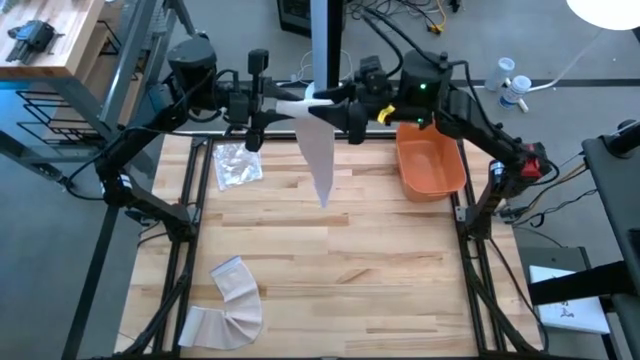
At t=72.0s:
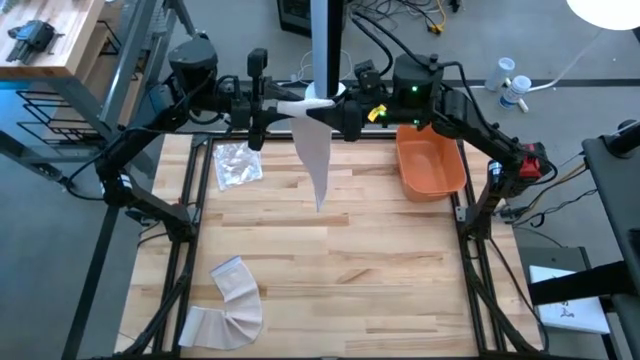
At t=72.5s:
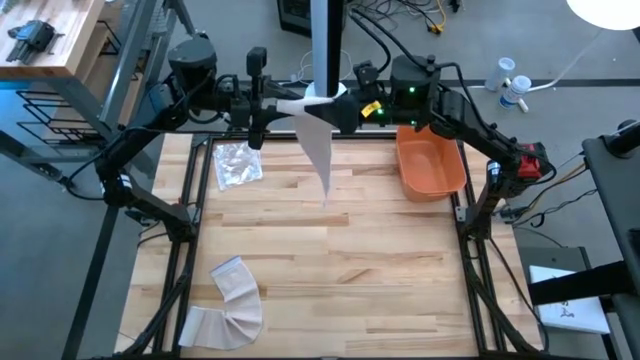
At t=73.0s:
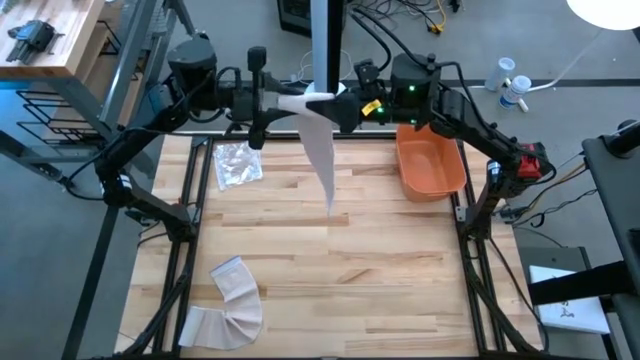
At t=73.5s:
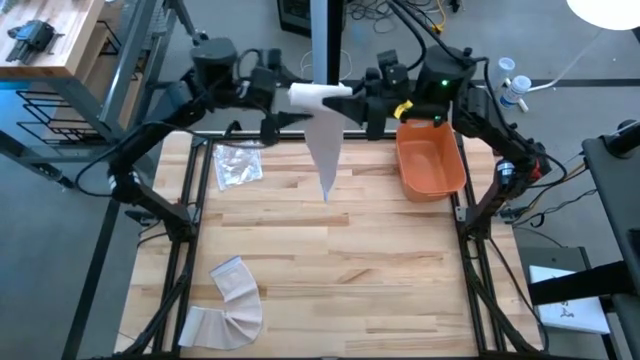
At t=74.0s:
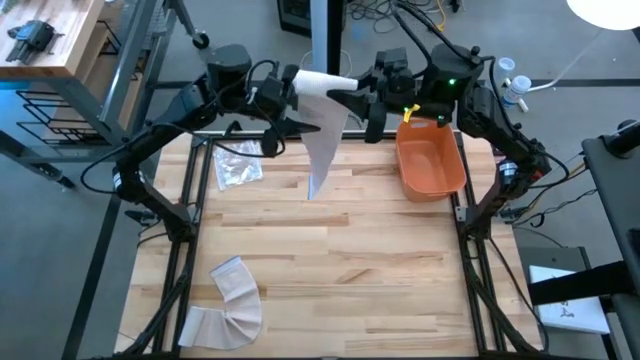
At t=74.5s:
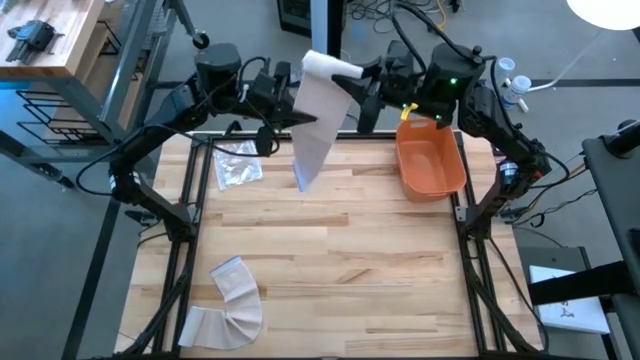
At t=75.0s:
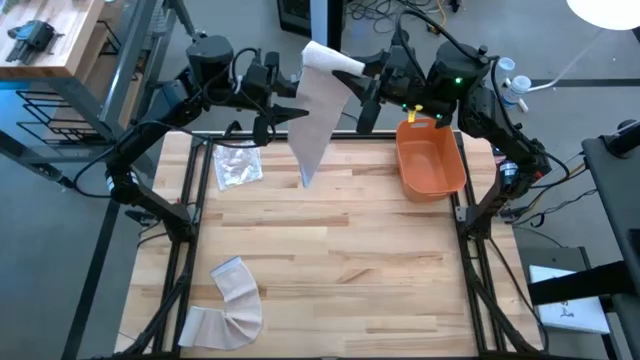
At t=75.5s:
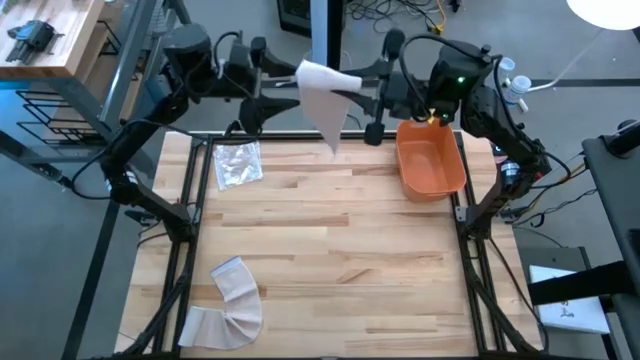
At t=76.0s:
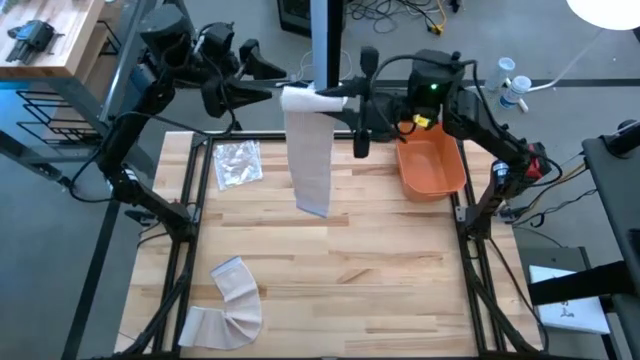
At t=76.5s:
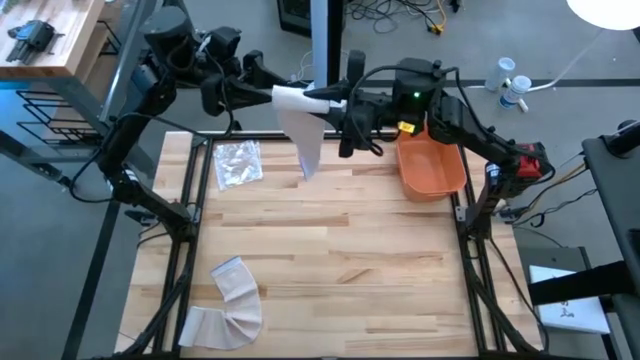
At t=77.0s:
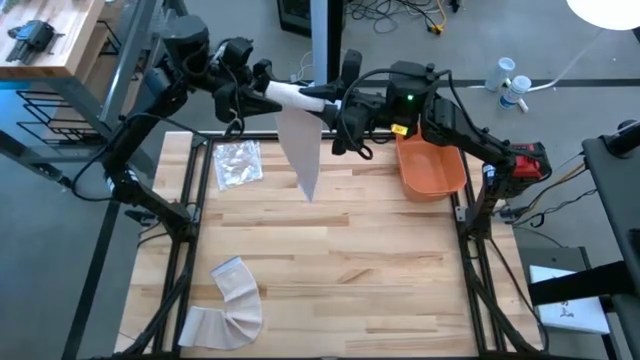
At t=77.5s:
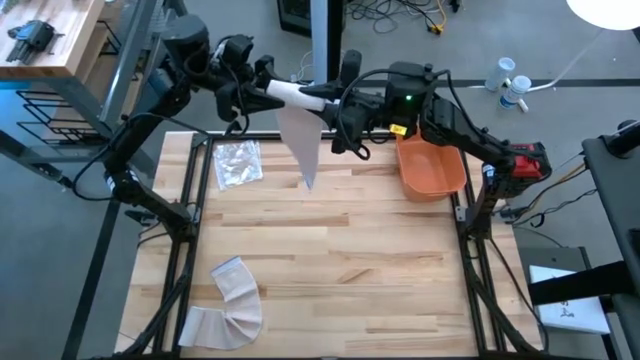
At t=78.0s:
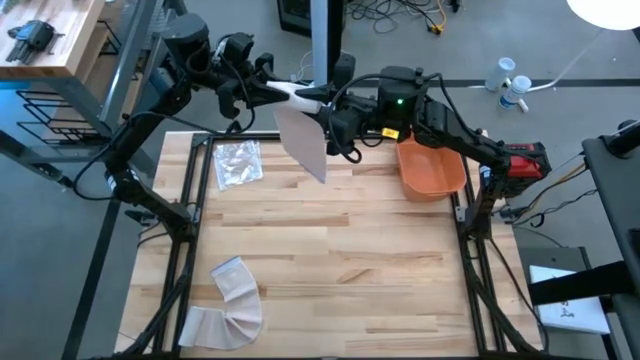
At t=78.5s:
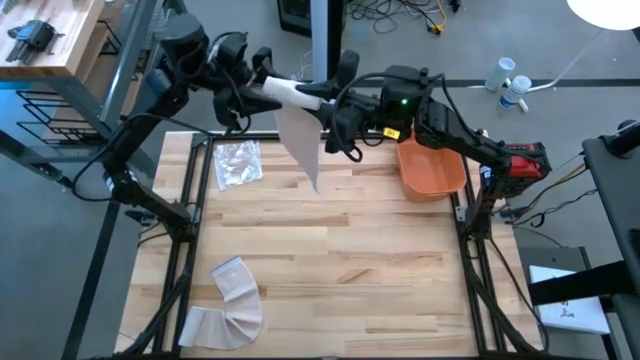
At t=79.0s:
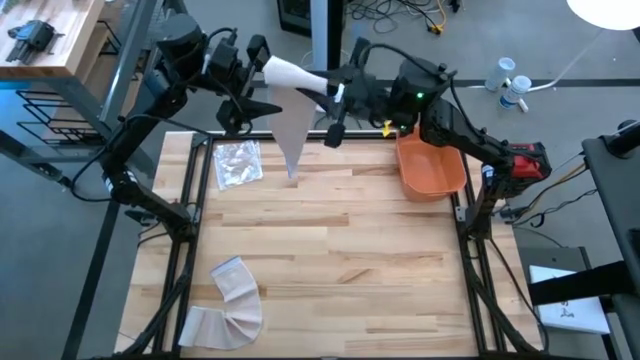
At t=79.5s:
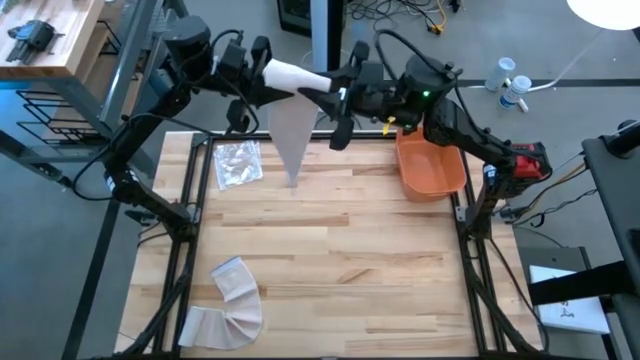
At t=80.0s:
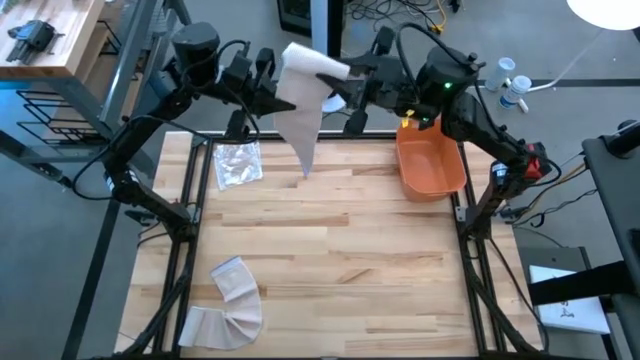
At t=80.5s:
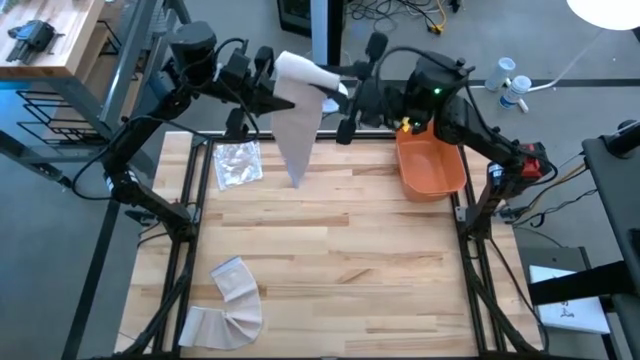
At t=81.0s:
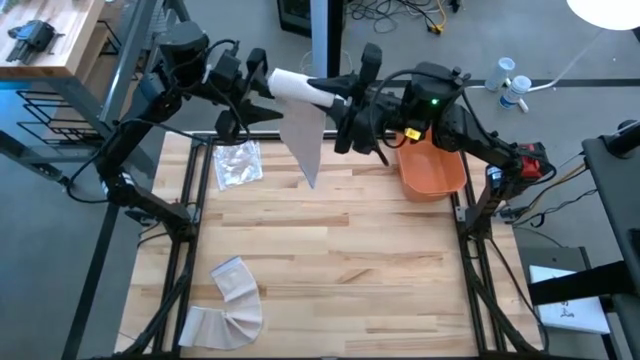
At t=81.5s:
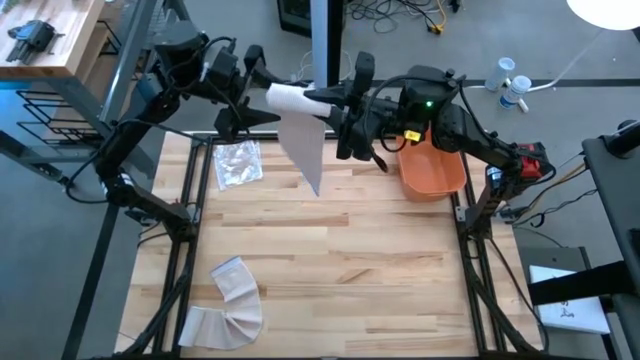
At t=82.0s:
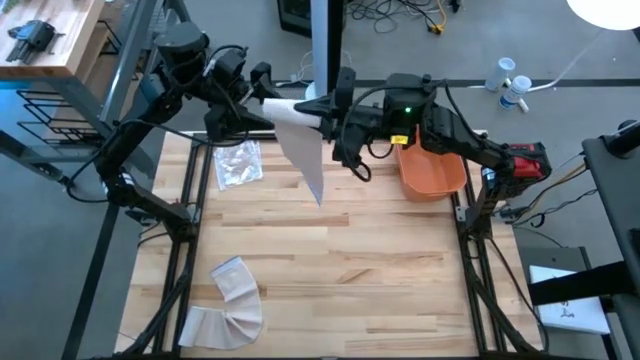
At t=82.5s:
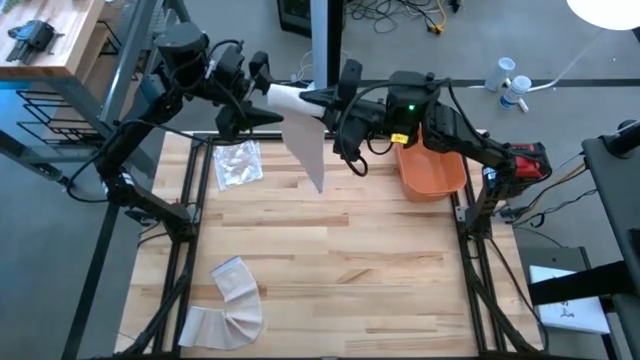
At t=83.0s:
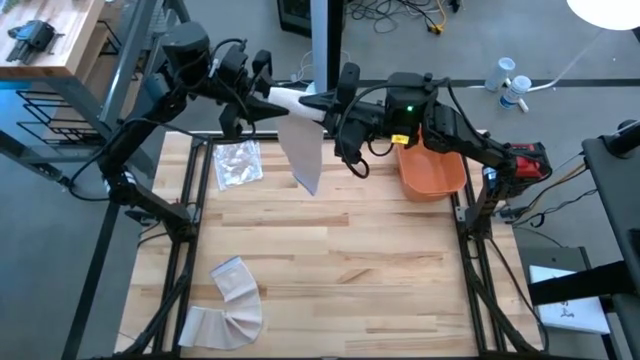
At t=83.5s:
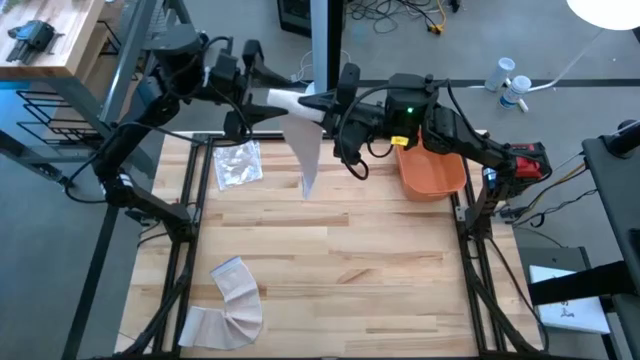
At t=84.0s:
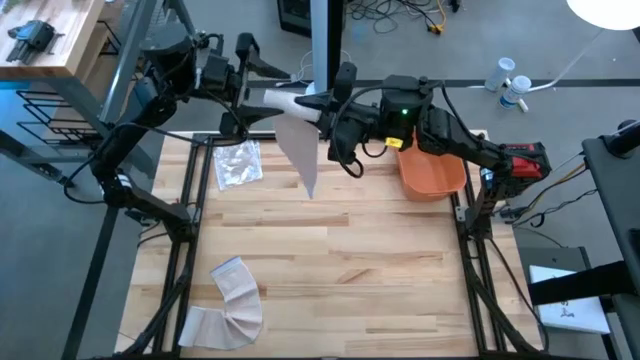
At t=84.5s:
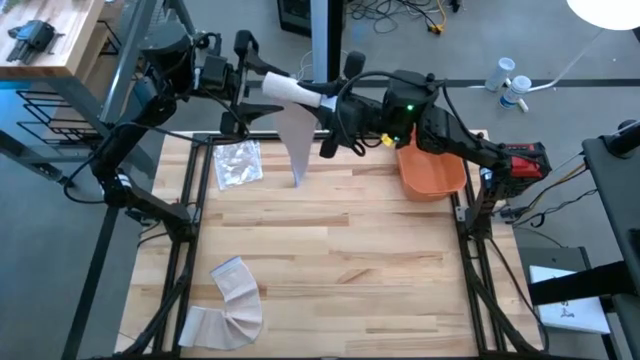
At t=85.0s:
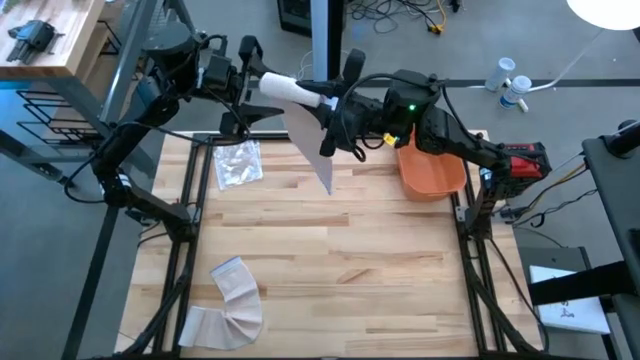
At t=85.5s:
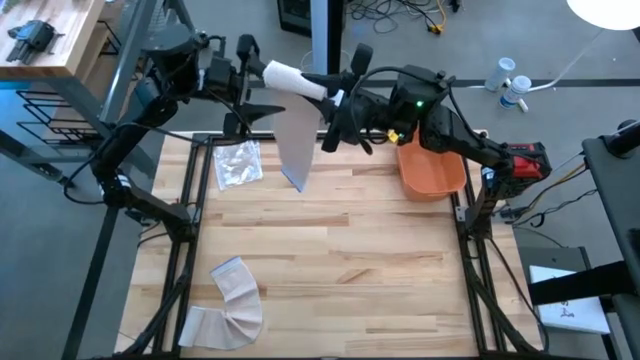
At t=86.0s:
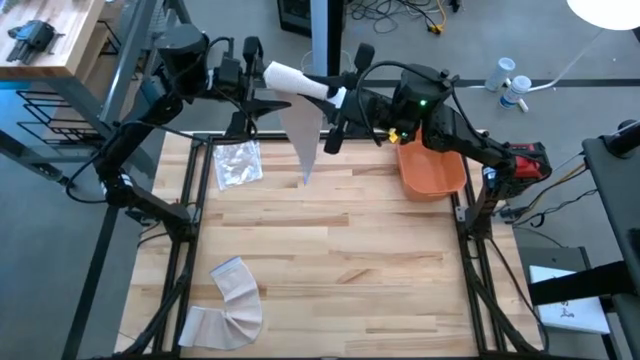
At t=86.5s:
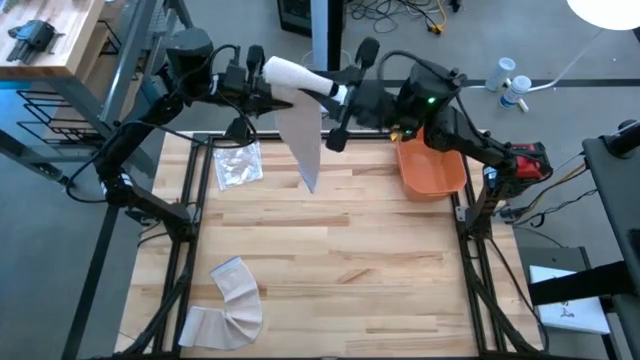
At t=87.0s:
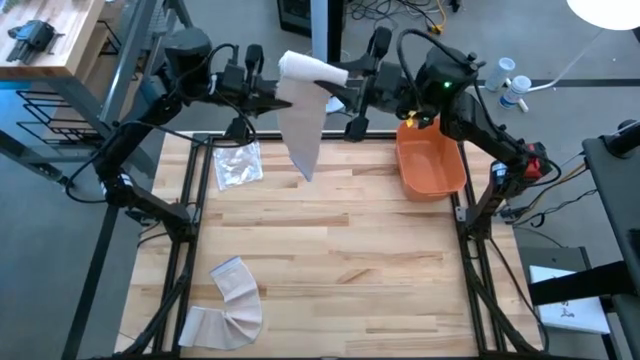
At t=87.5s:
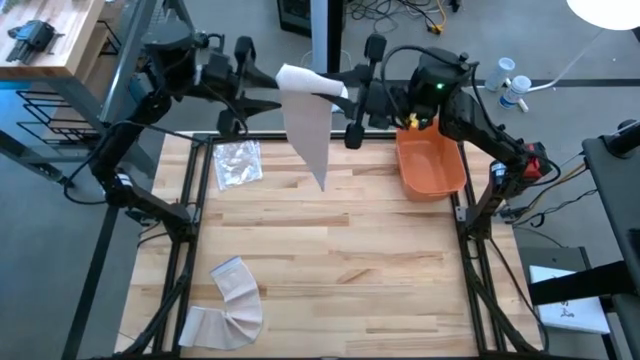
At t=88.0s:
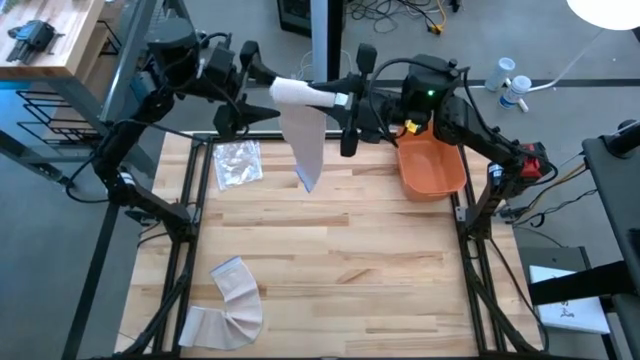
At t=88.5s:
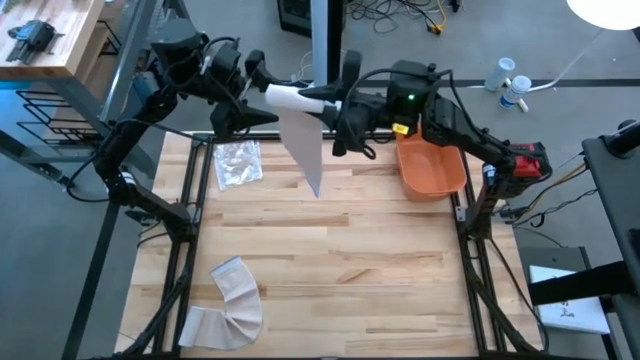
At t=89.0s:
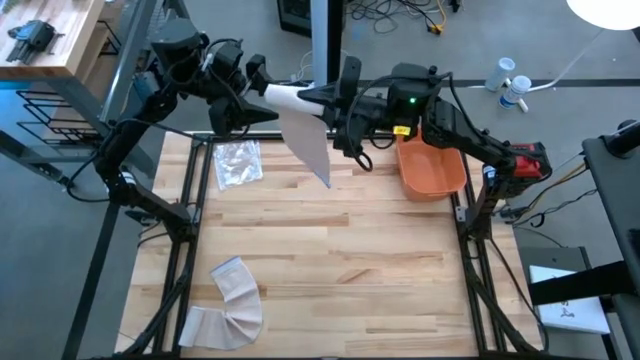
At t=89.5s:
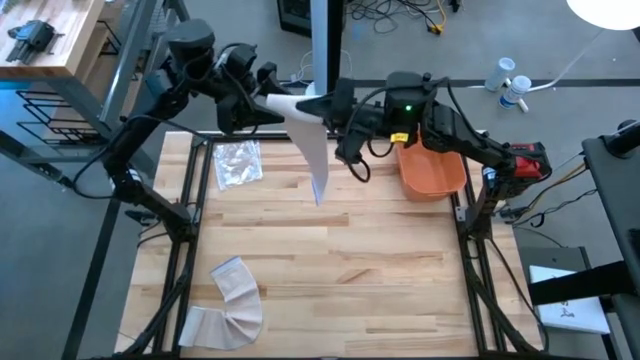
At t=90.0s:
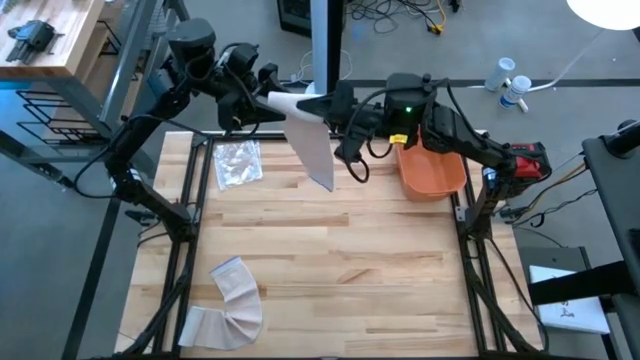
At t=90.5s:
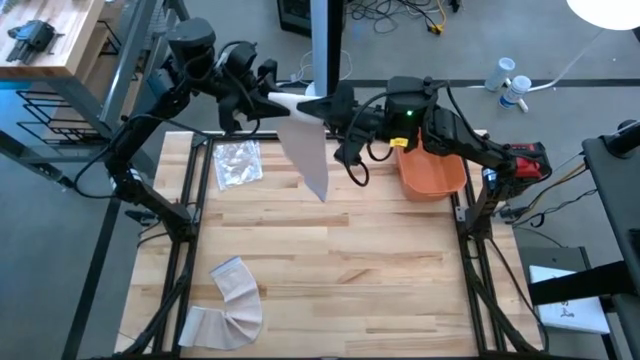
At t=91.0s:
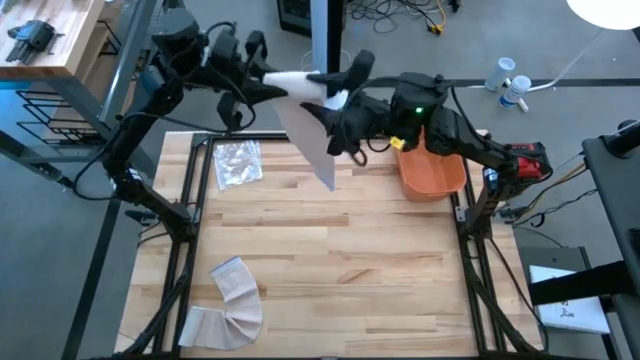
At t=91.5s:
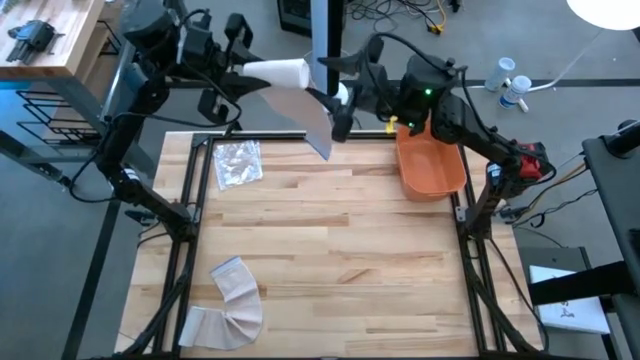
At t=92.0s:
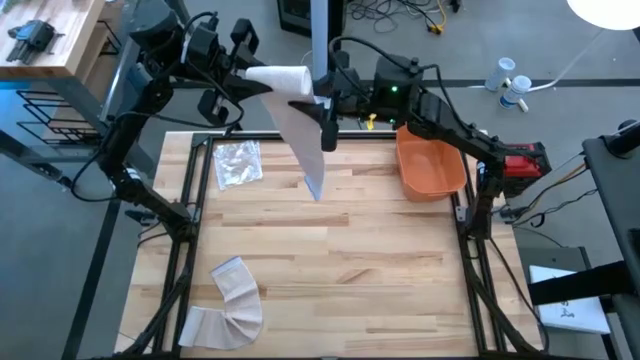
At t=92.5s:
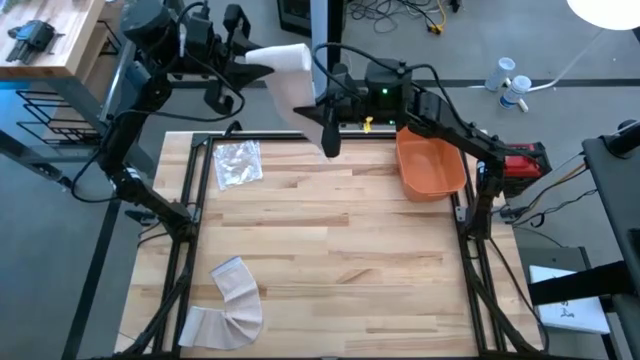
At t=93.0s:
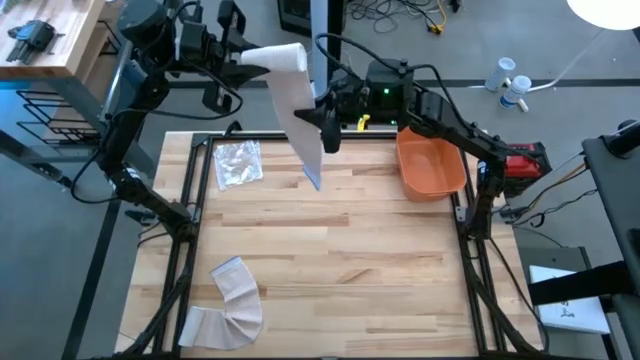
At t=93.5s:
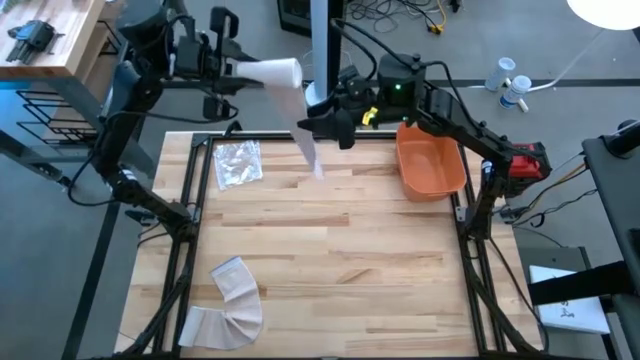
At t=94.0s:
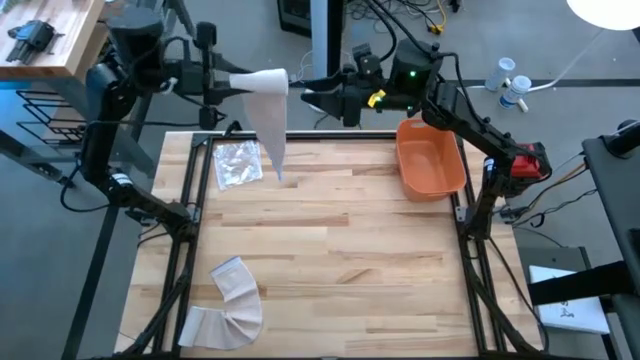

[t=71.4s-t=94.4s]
Task: Roll bandage
Roll the center brown bandage
